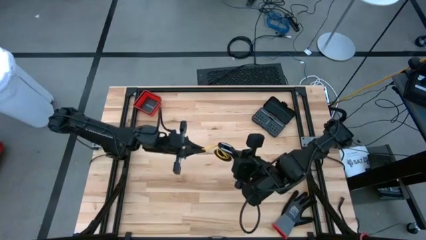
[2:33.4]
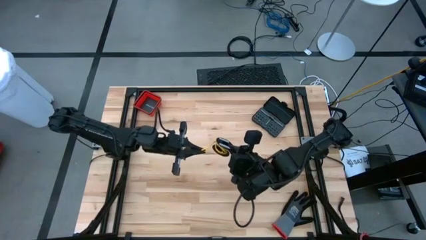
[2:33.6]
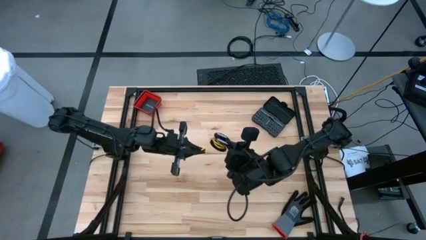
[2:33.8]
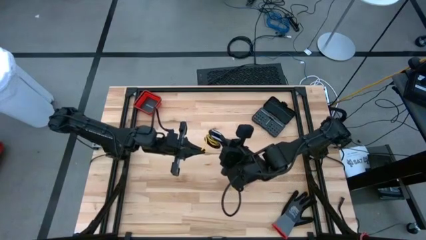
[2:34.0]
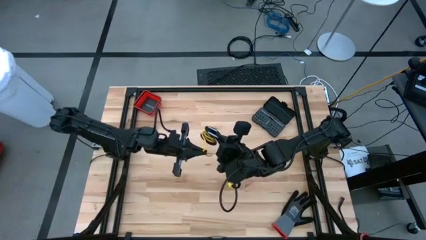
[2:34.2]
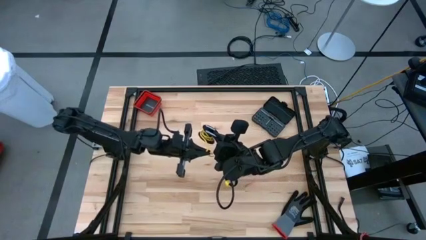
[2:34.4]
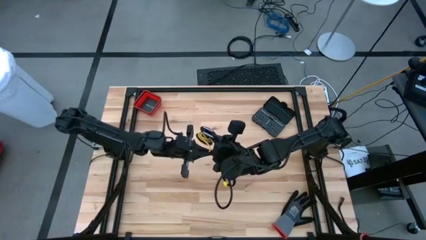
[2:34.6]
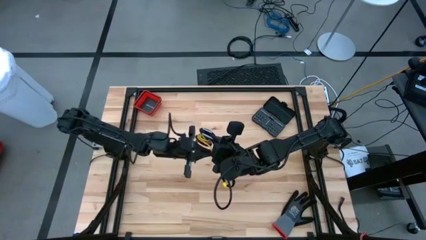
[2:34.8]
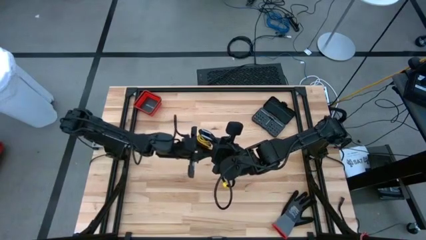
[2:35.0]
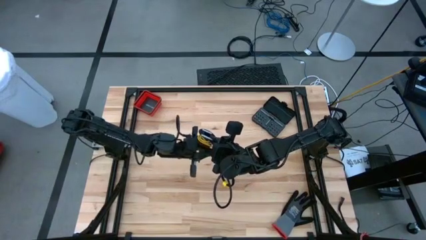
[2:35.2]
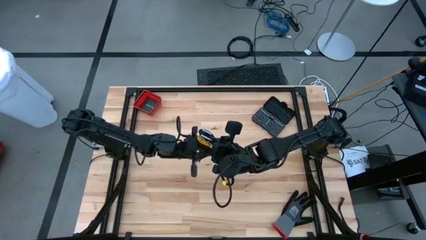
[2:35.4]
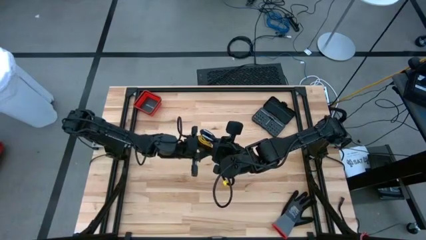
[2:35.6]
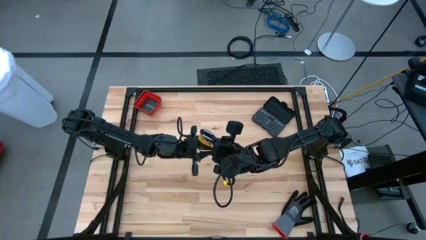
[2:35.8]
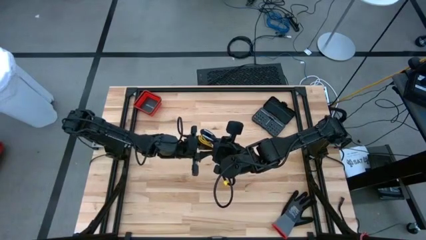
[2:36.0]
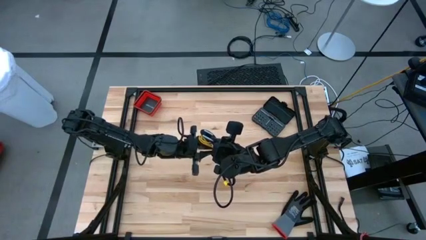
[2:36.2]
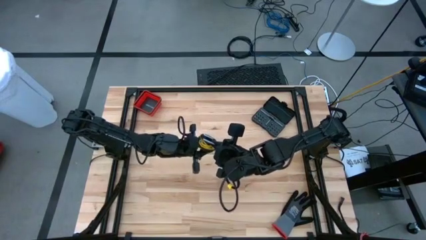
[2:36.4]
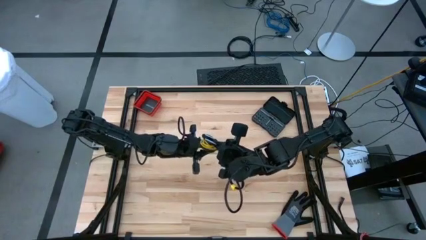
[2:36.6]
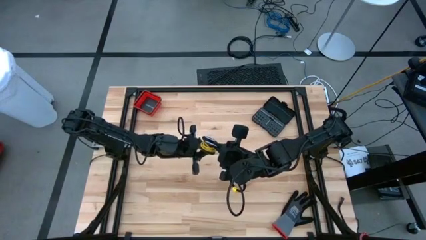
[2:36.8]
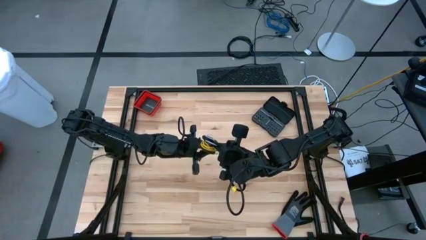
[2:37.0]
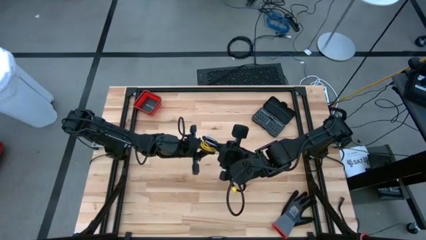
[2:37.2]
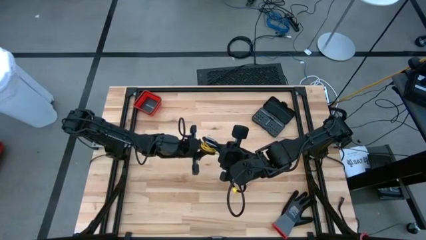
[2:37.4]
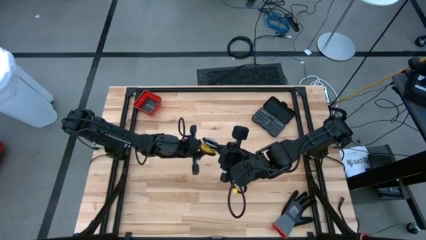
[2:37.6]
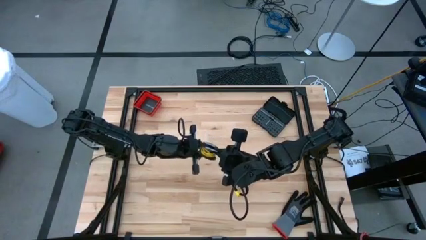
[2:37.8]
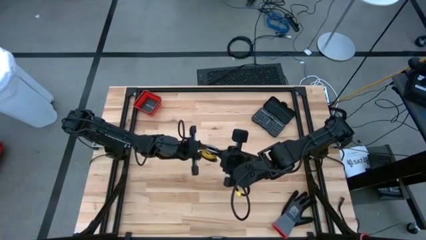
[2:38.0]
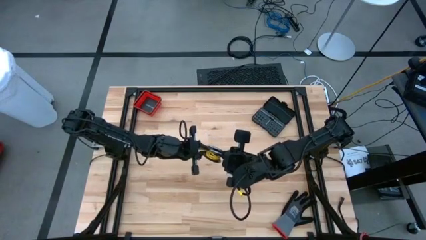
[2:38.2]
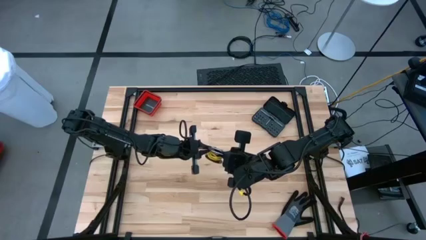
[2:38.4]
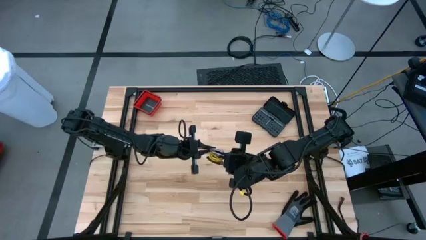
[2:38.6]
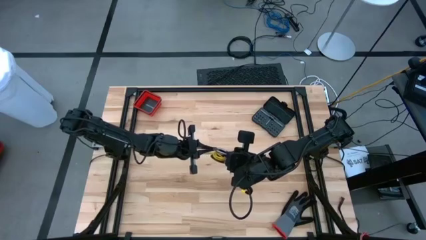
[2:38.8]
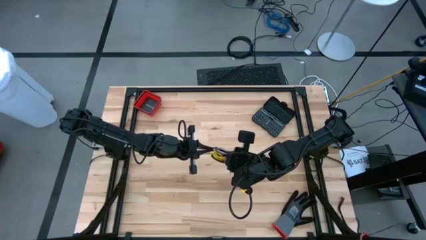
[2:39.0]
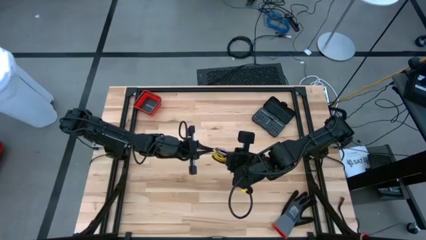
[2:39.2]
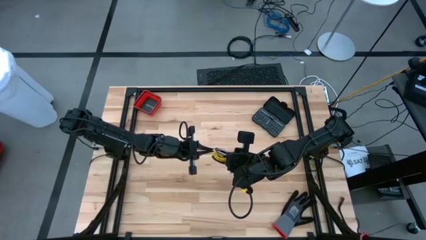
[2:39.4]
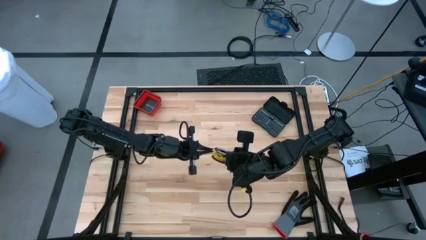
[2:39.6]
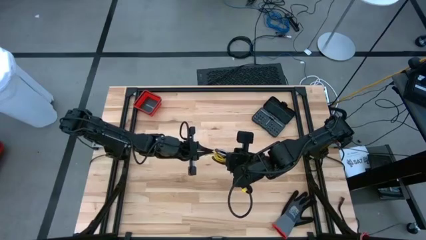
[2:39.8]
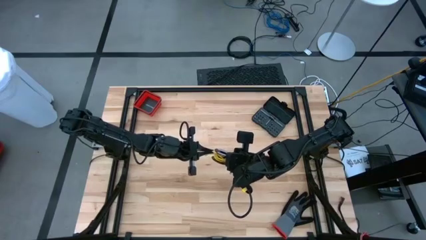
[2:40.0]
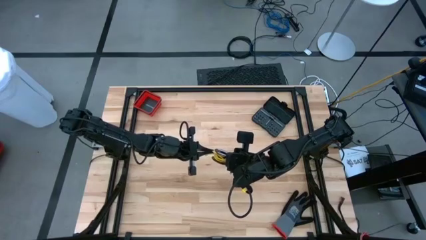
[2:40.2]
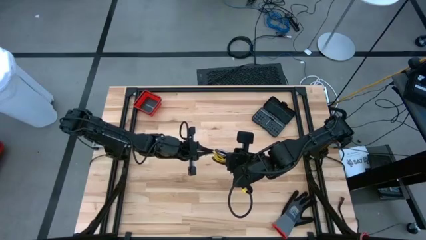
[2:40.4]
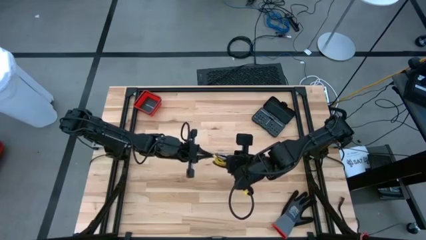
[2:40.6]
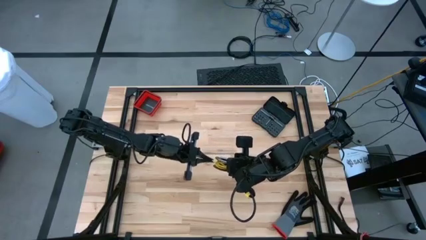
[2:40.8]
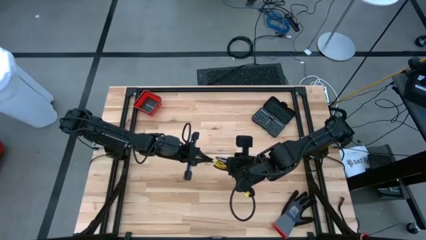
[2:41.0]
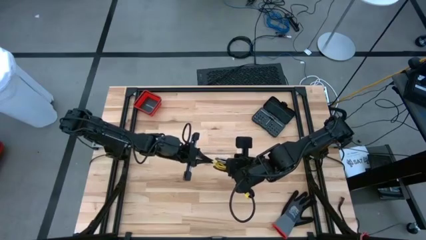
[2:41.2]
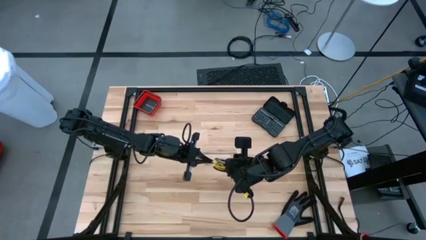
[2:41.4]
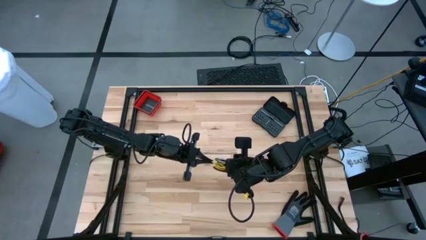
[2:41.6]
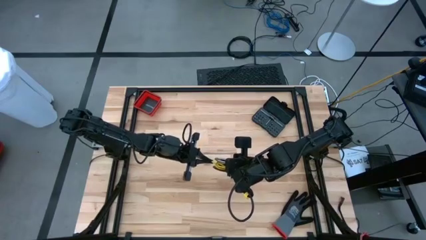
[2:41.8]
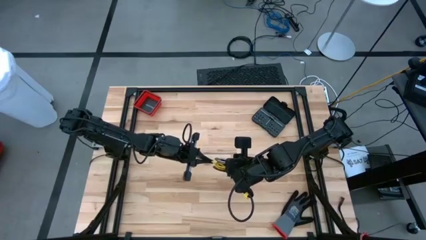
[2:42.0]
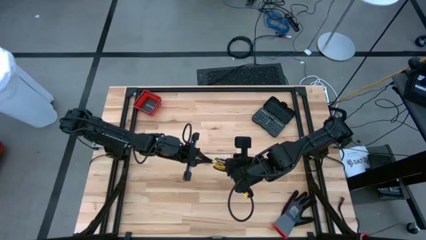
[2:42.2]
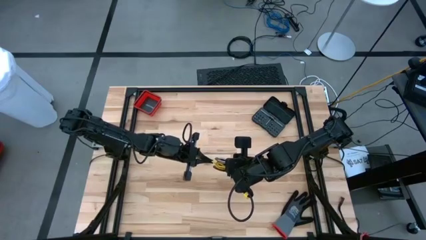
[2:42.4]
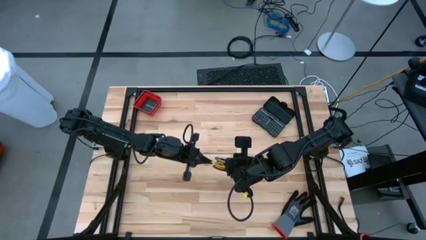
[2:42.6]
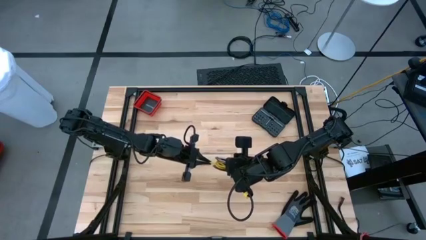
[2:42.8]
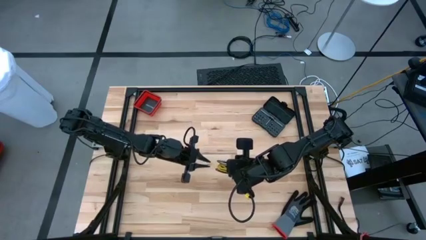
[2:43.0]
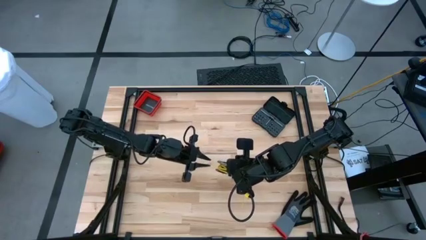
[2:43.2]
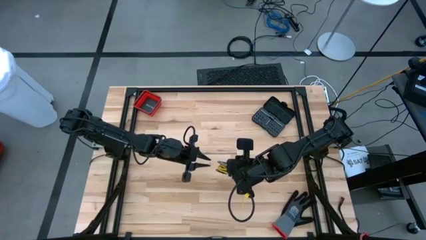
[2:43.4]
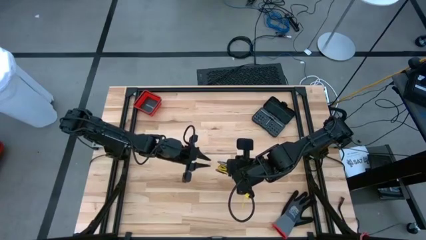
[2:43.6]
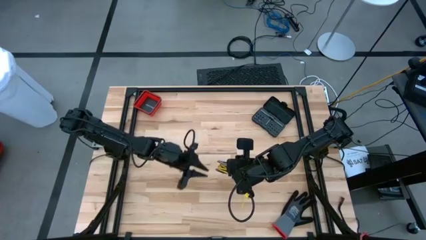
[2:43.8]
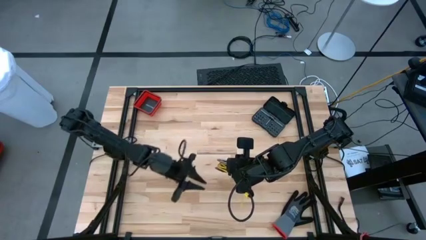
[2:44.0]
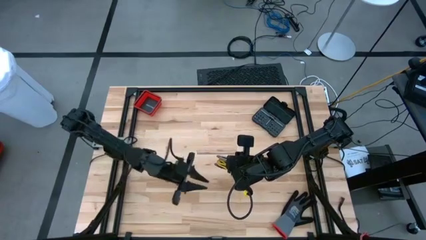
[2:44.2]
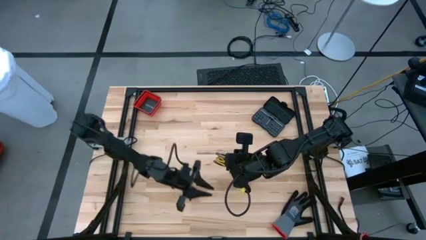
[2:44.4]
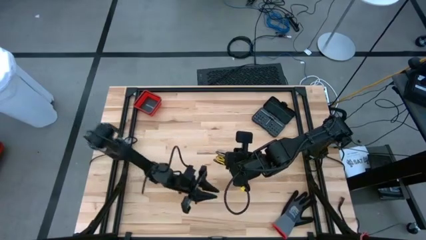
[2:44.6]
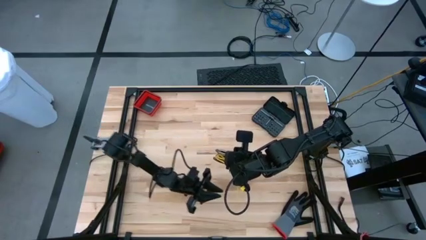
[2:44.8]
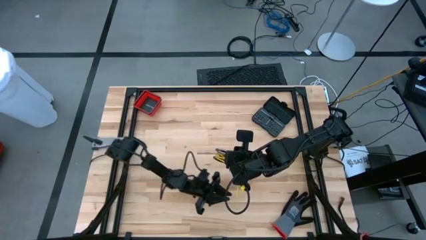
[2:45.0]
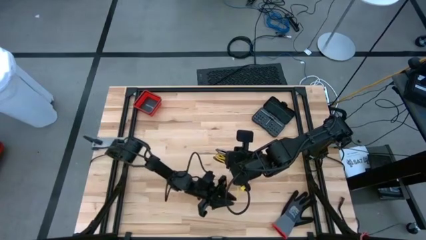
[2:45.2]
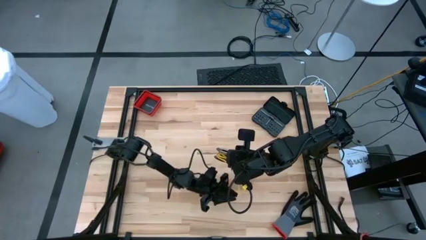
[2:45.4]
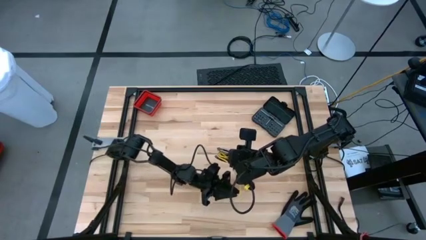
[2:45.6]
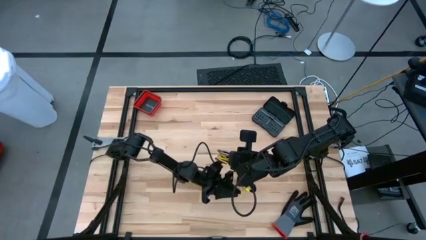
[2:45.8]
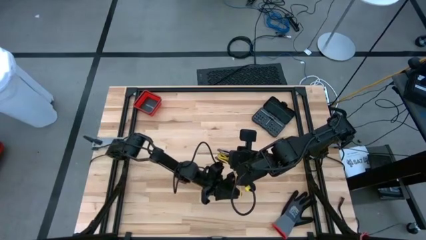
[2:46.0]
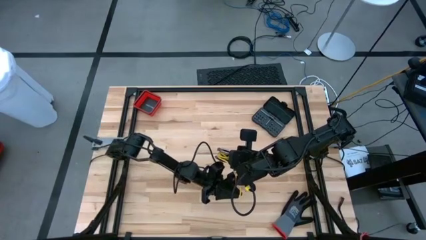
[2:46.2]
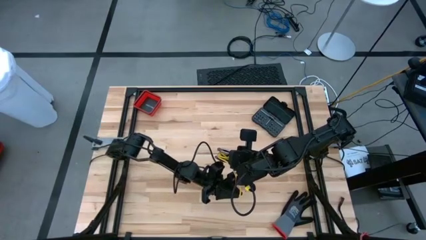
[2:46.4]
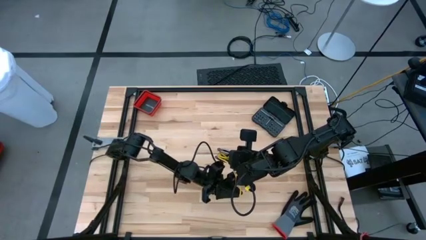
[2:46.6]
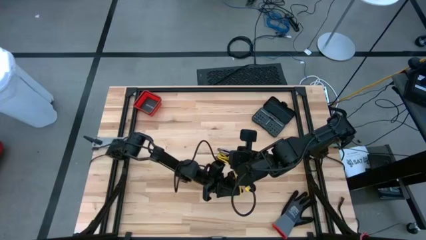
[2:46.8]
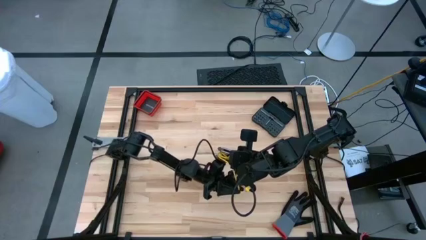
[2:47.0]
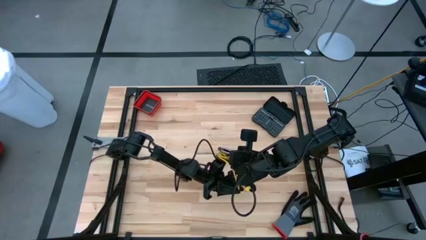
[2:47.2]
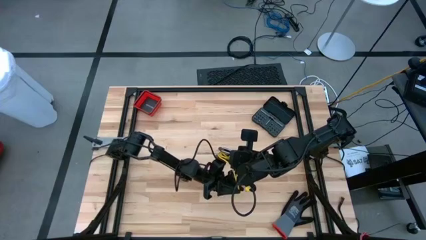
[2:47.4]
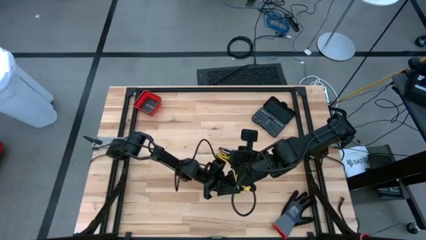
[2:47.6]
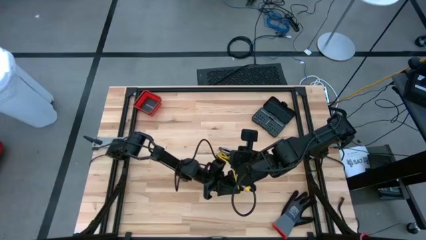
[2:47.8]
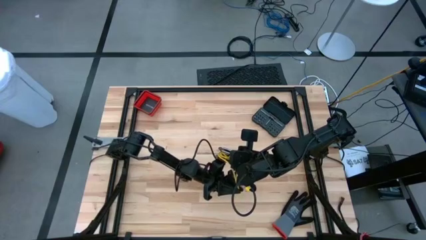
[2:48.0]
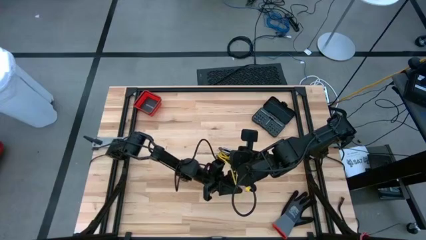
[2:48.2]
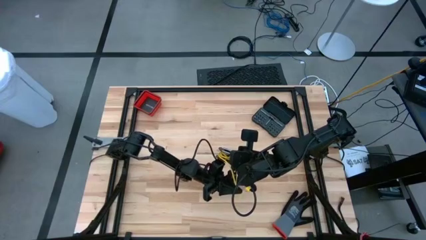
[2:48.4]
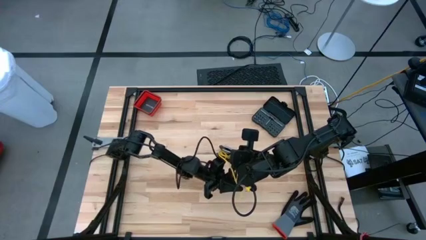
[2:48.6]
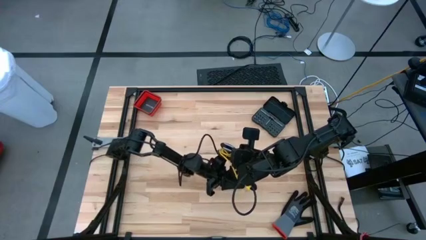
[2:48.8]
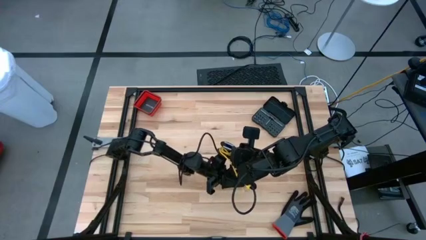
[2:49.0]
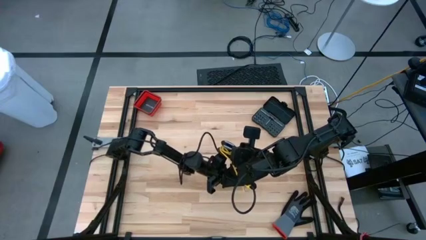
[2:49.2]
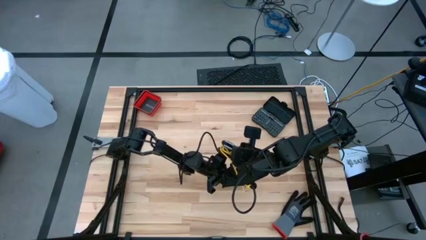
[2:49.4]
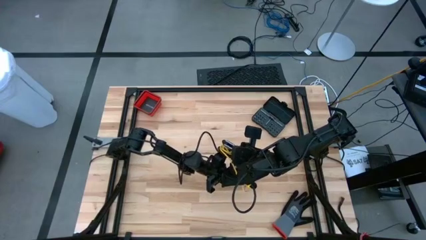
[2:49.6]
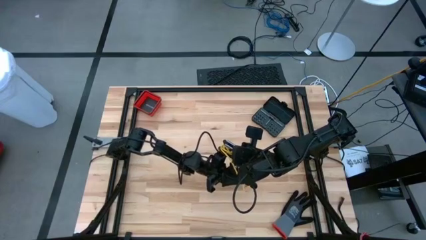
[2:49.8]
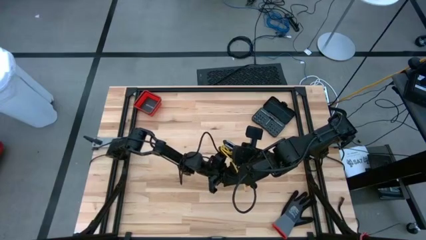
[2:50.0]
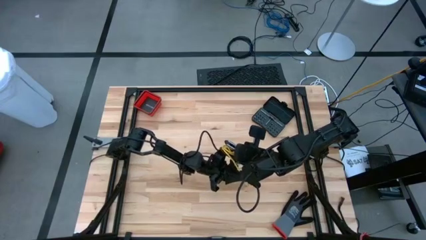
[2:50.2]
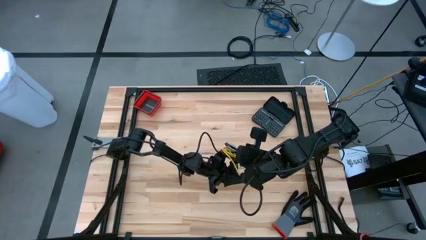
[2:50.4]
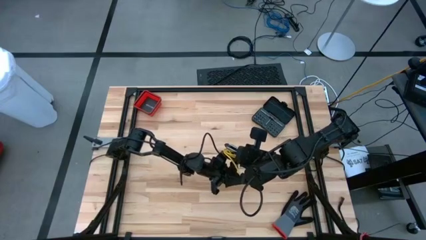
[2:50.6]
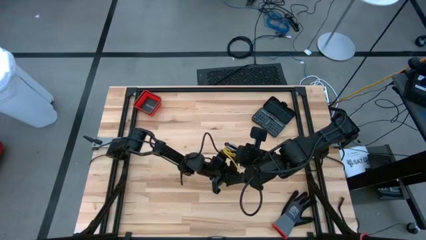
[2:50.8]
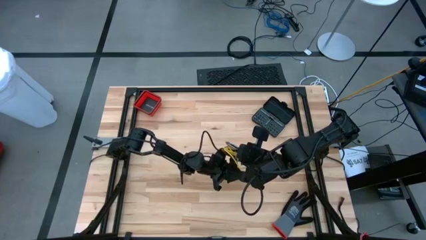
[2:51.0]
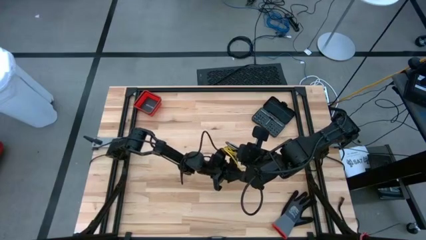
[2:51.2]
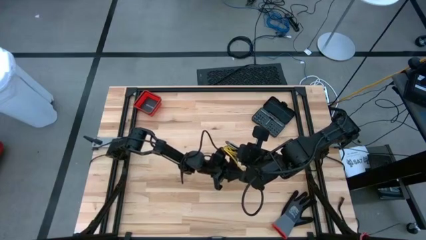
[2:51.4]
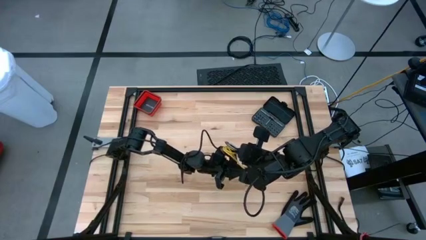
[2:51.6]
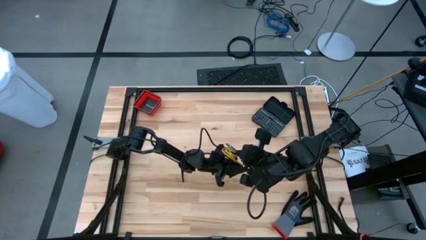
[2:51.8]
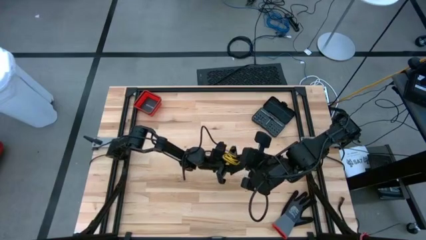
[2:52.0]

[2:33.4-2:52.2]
Task: Coil cords
Coil the yellow cable wire onto the spool
